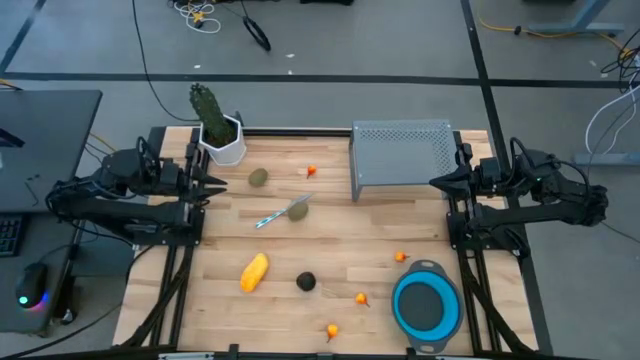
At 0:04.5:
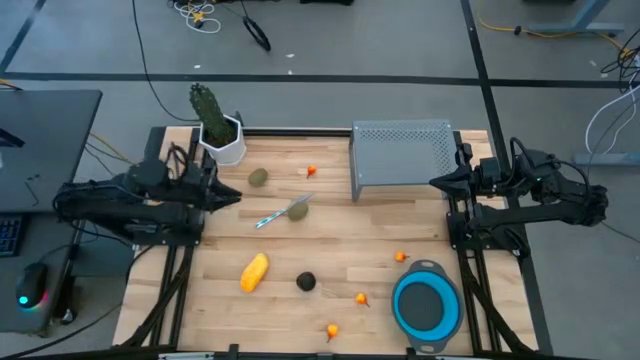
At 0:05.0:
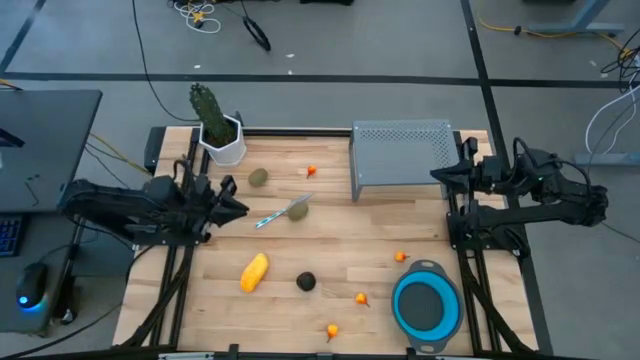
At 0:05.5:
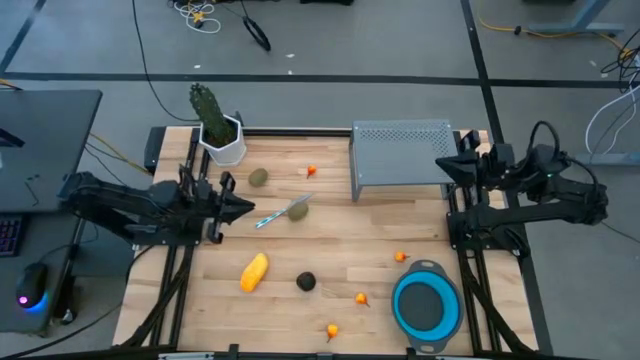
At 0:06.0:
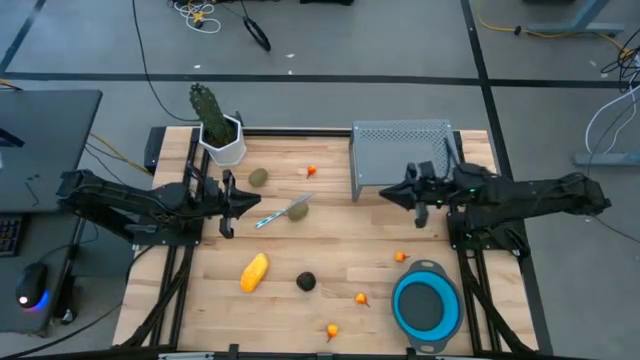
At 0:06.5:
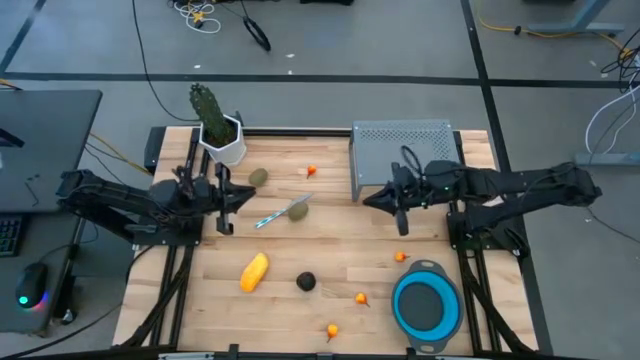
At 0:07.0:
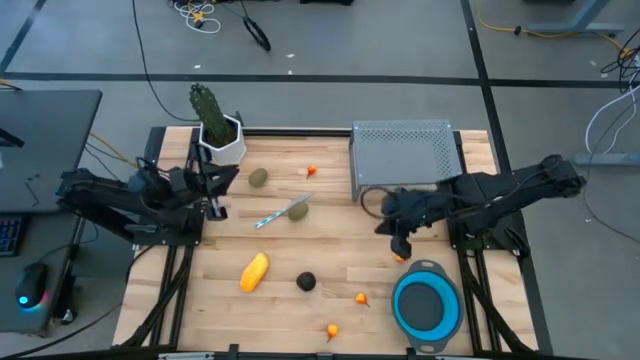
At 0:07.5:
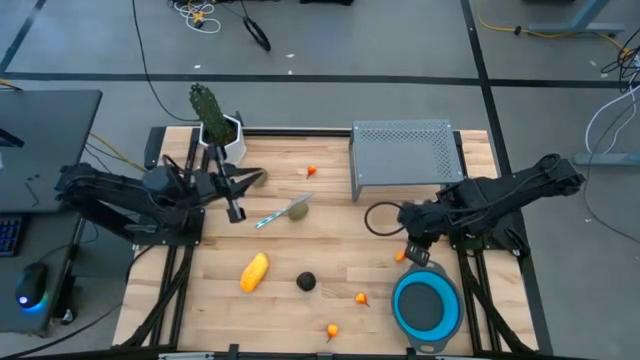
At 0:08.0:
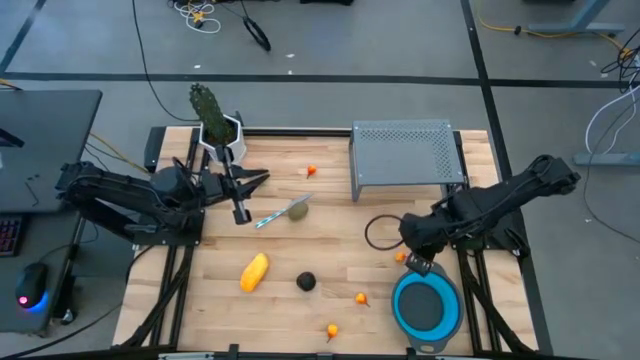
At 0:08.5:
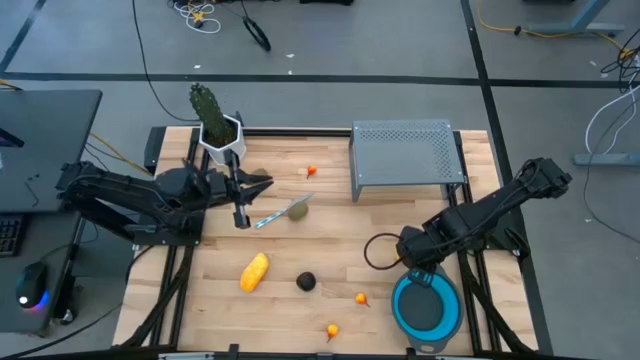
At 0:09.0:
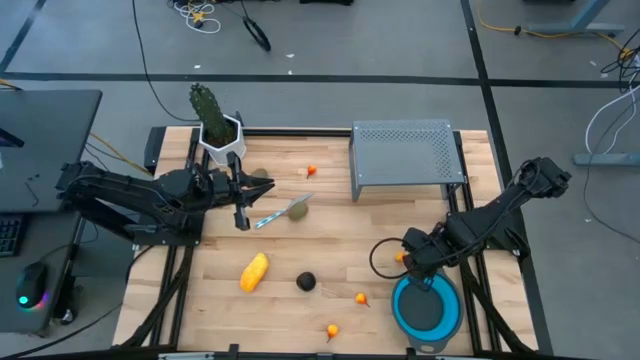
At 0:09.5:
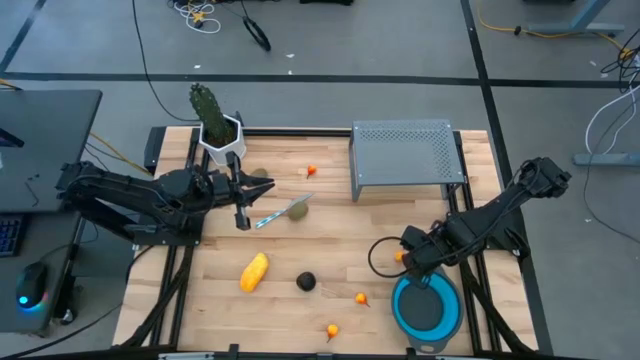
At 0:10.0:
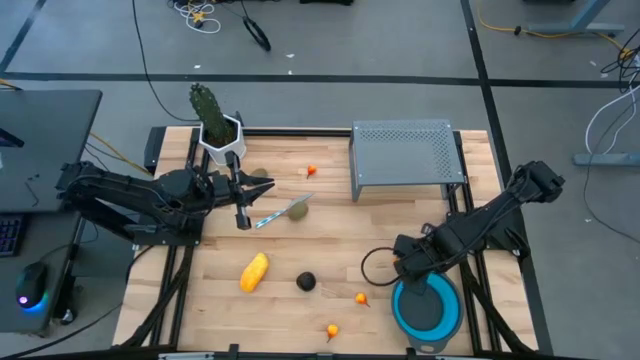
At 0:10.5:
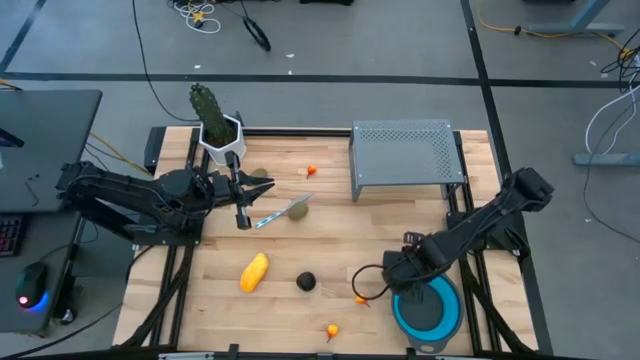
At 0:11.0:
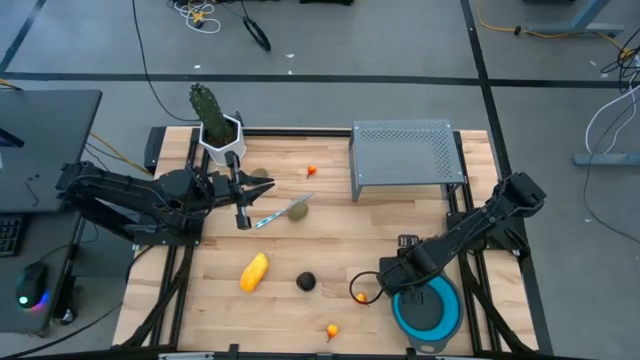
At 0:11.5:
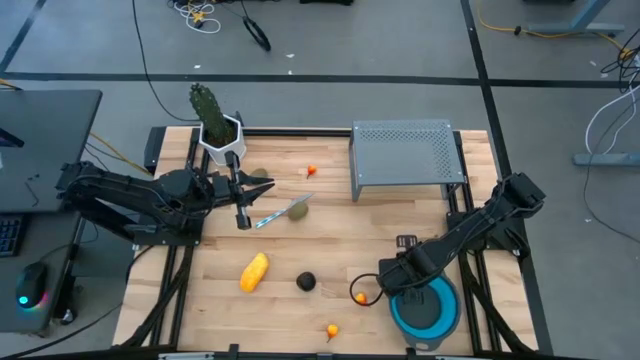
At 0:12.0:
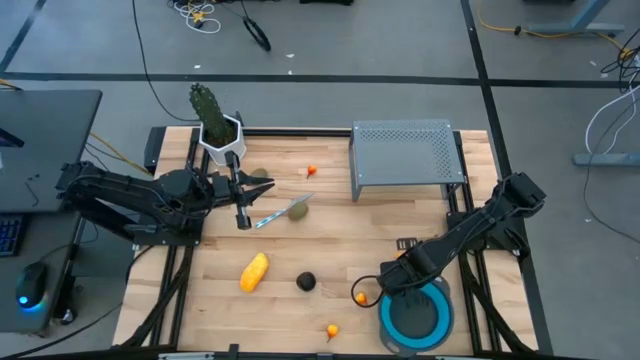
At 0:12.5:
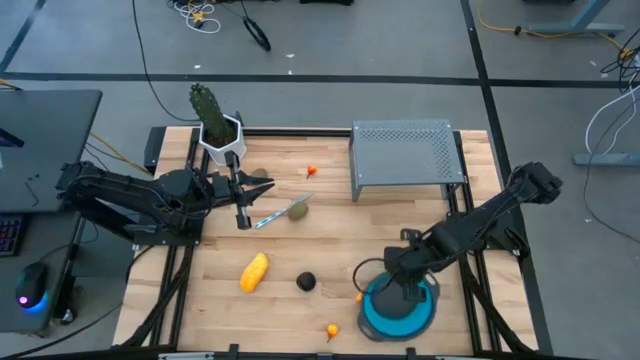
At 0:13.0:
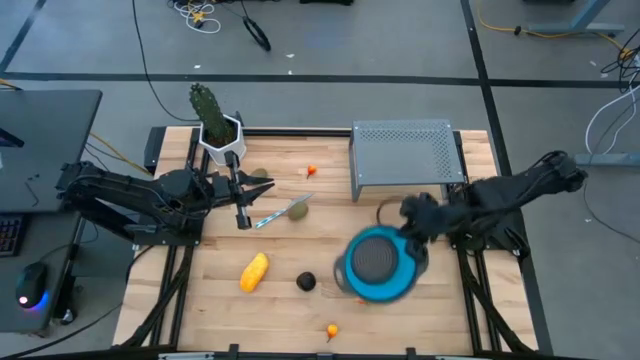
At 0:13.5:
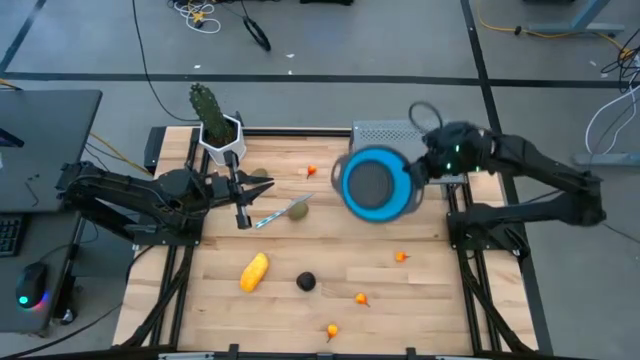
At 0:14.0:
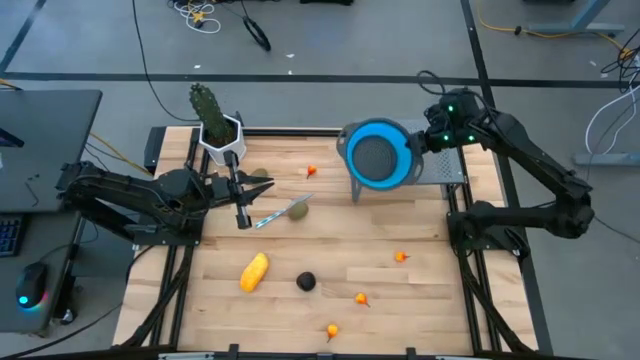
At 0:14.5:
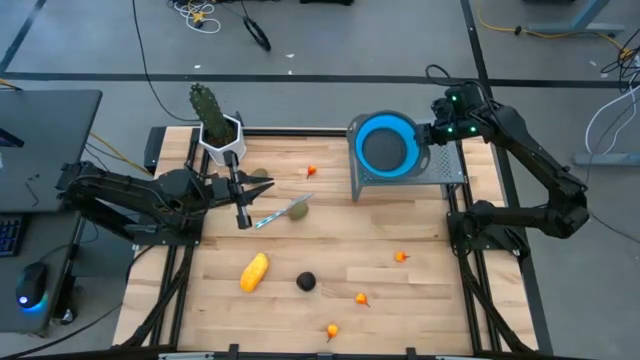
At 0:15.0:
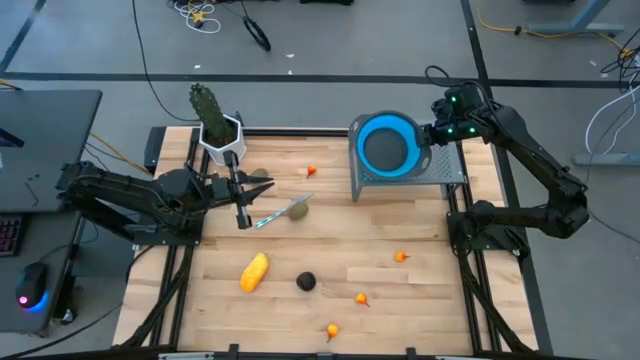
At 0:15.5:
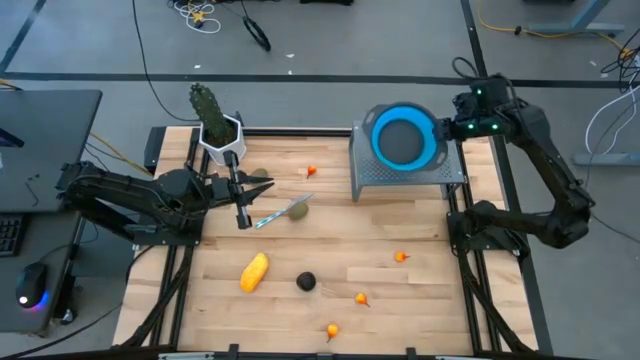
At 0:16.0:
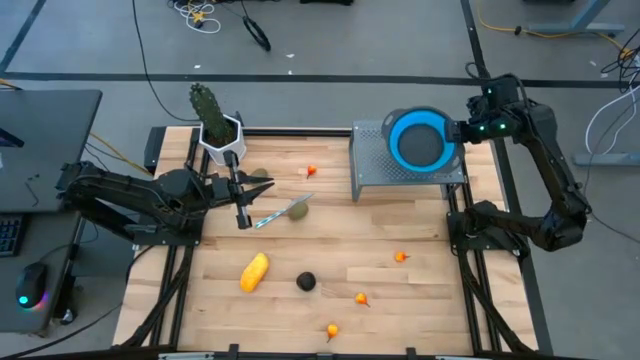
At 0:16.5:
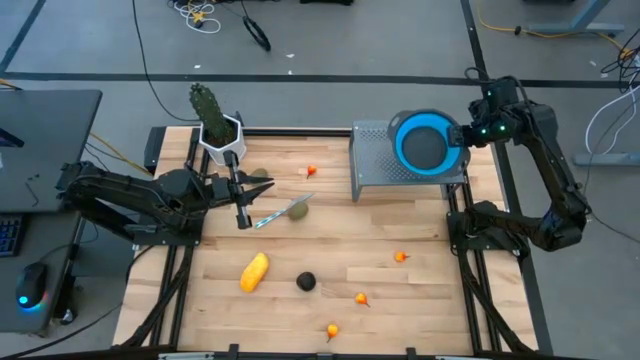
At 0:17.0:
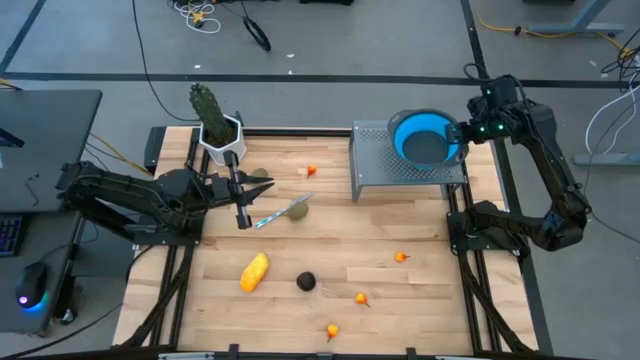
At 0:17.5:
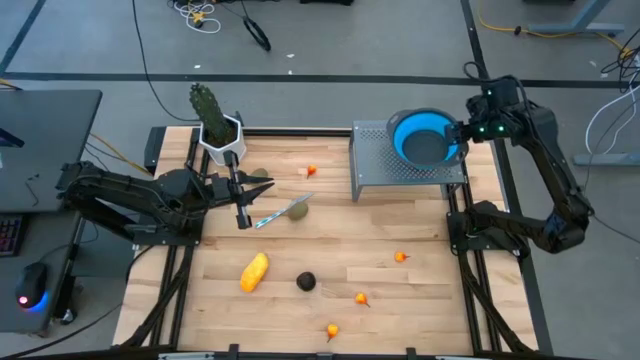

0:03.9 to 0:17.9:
Task: Pick & Place Fruit
Put the blue strainer bowl on the shelf

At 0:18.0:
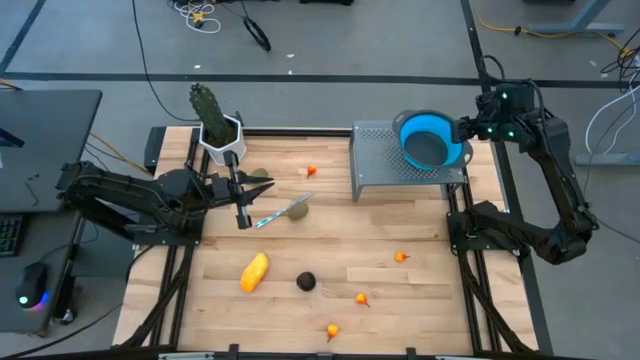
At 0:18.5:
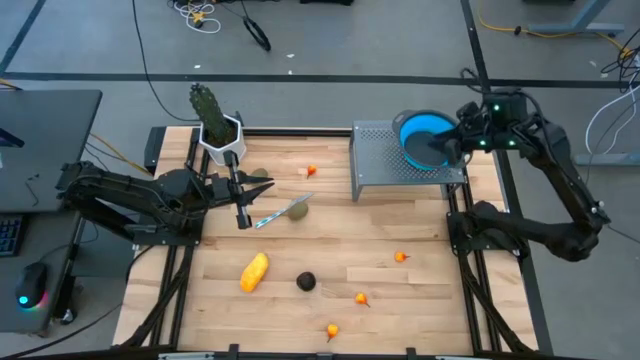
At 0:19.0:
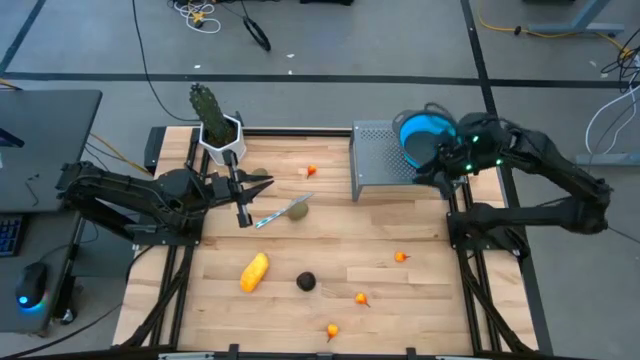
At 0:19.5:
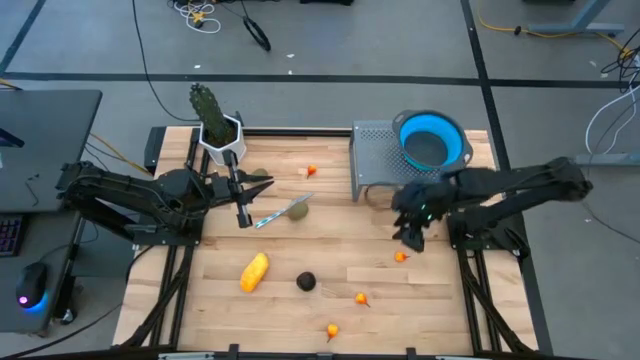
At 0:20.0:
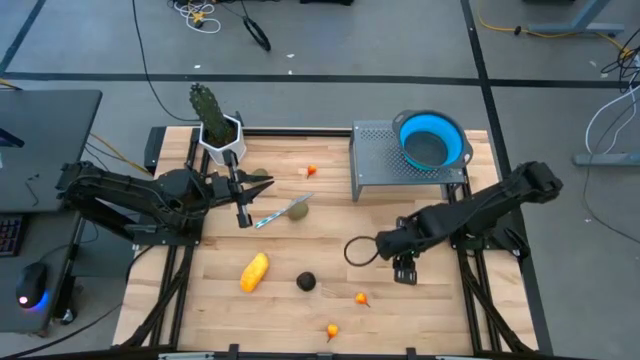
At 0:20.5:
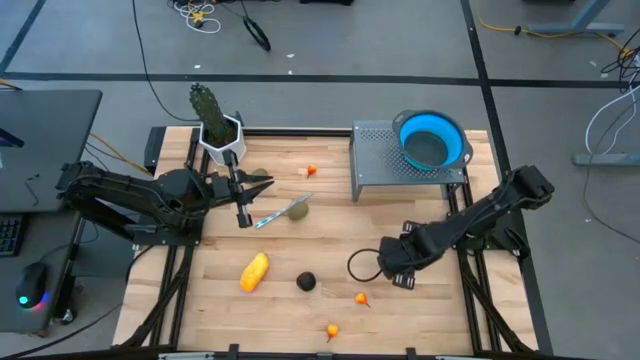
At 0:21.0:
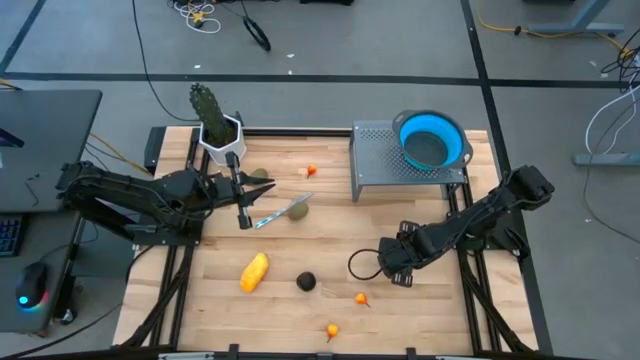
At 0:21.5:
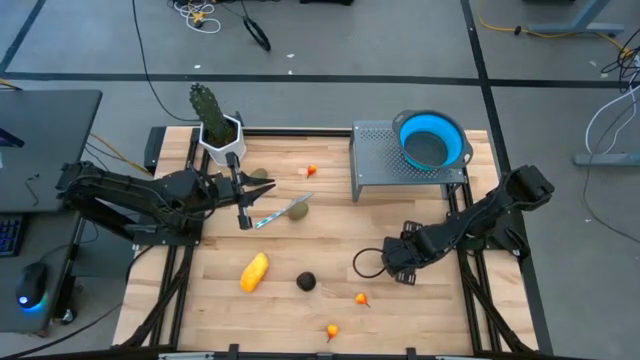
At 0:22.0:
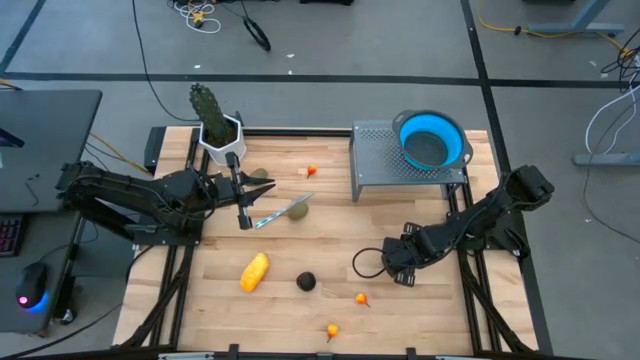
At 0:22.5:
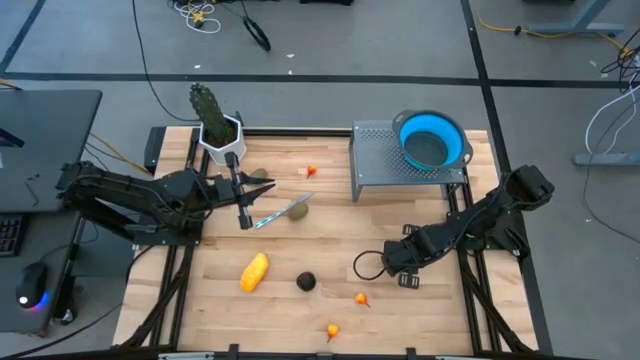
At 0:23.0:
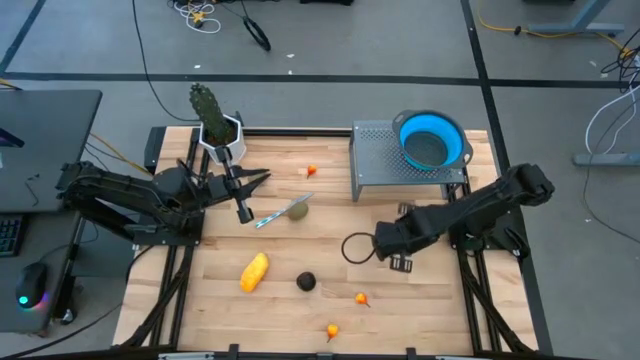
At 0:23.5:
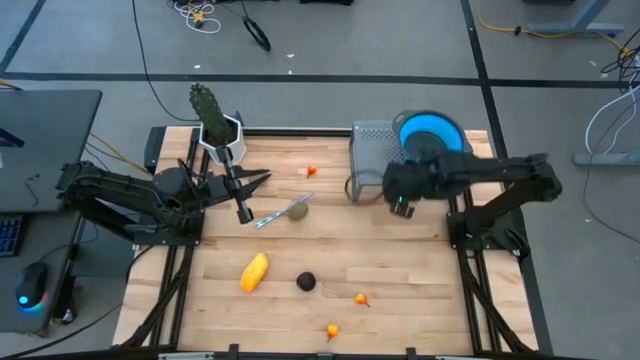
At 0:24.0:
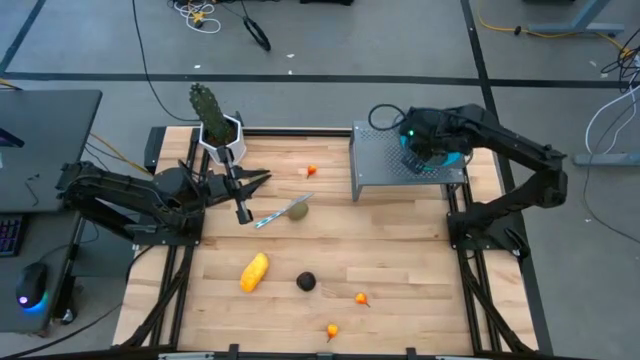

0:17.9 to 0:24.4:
Put the pear into the blue strainer bowl on the shelf

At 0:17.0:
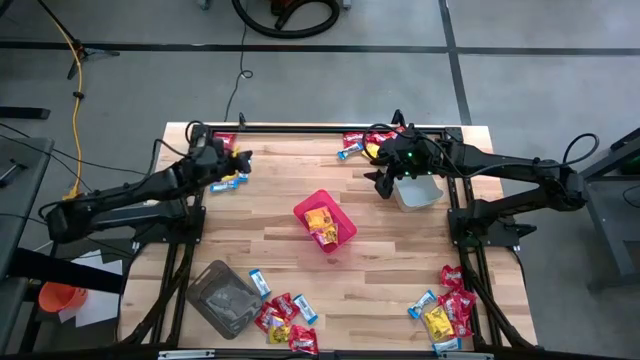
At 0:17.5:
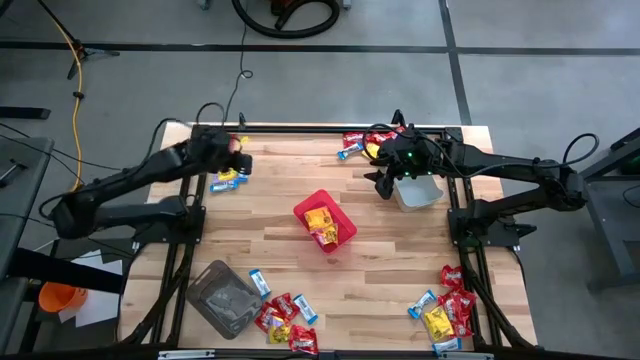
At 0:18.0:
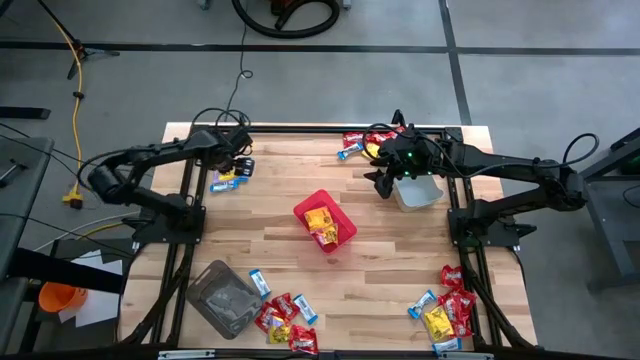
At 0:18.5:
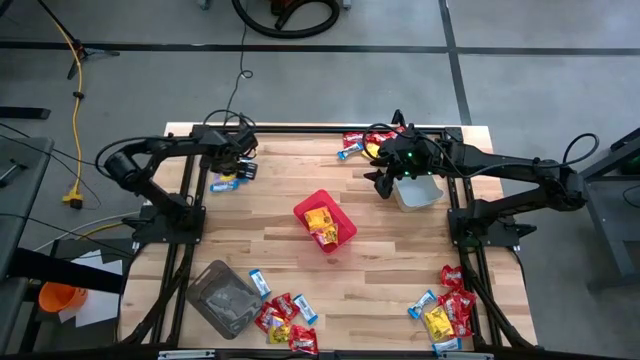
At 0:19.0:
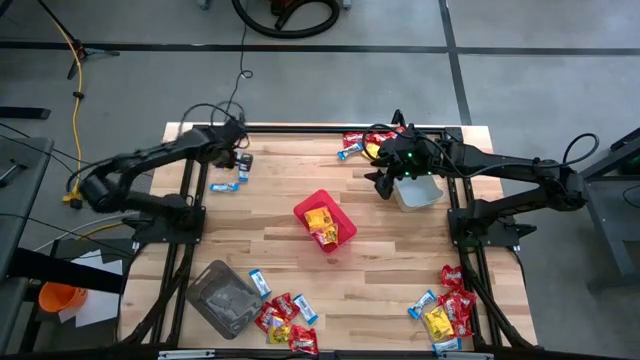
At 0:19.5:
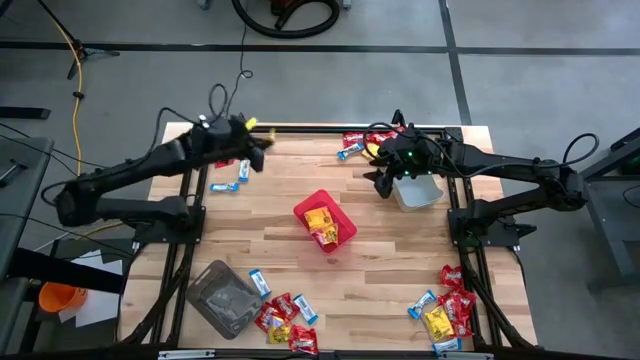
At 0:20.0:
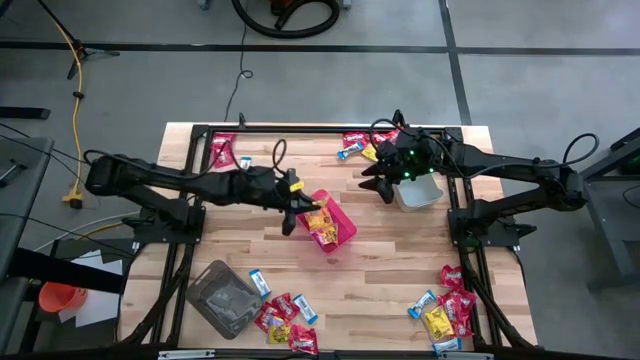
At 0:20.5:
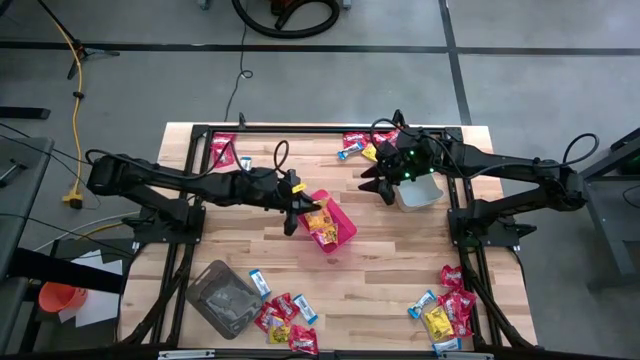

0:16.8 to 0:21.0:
Task: Sort candy
Put the yellow candy into the red bin
